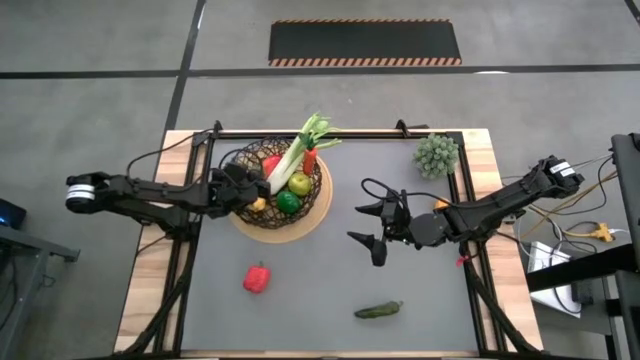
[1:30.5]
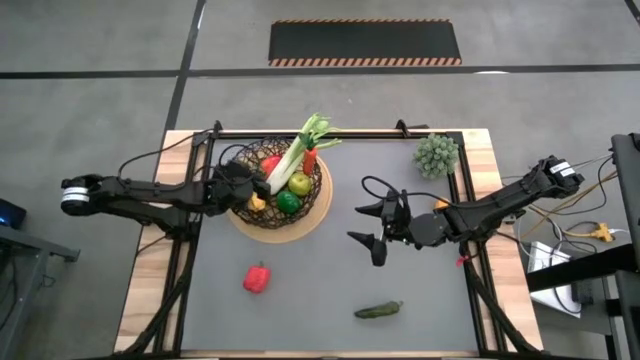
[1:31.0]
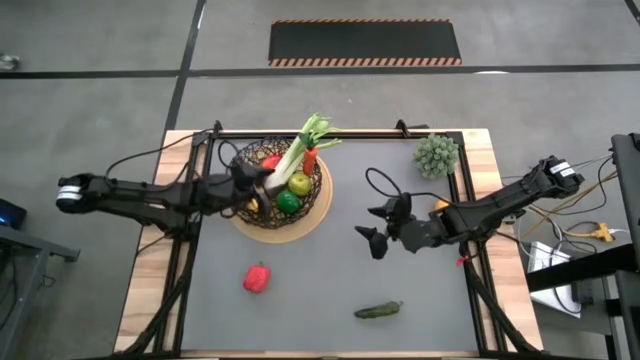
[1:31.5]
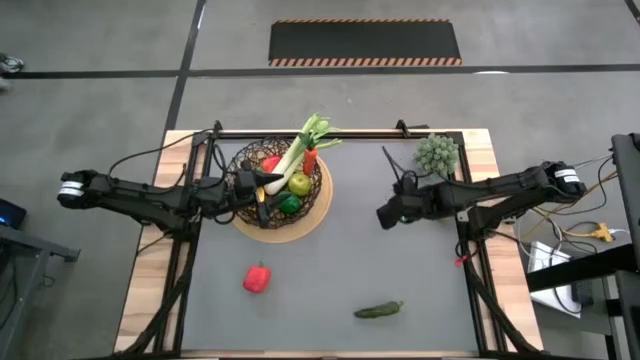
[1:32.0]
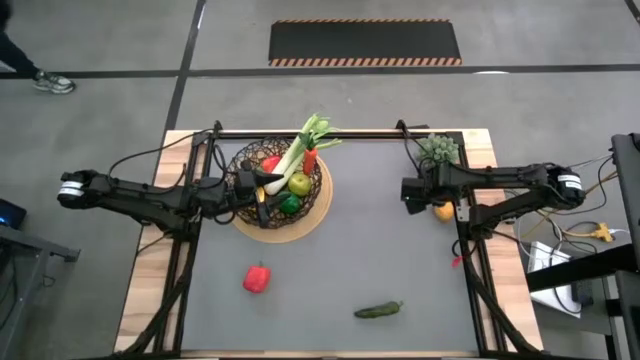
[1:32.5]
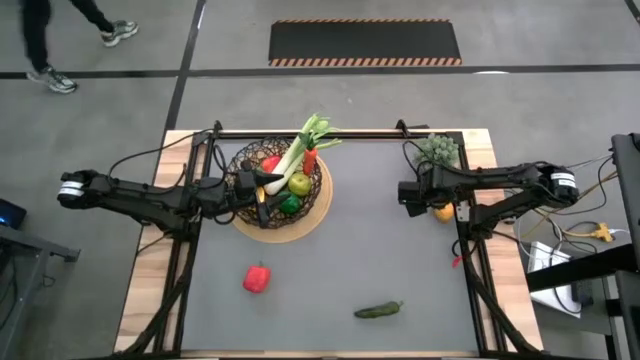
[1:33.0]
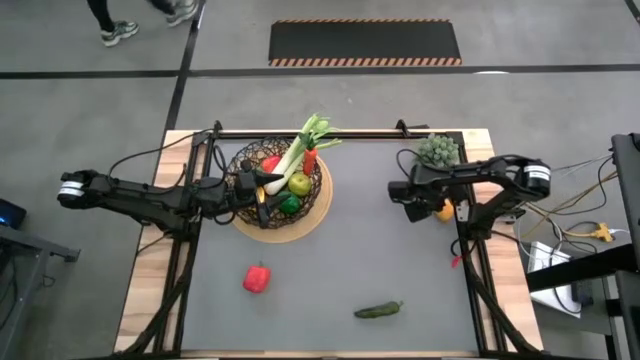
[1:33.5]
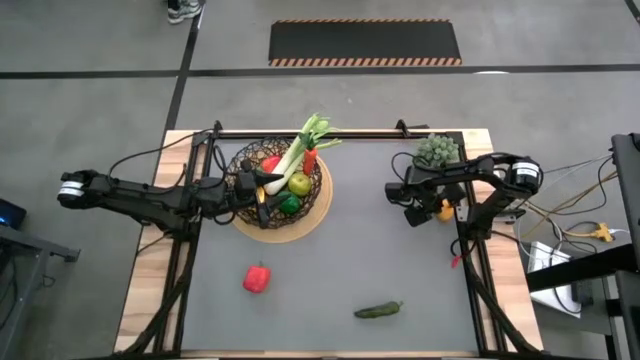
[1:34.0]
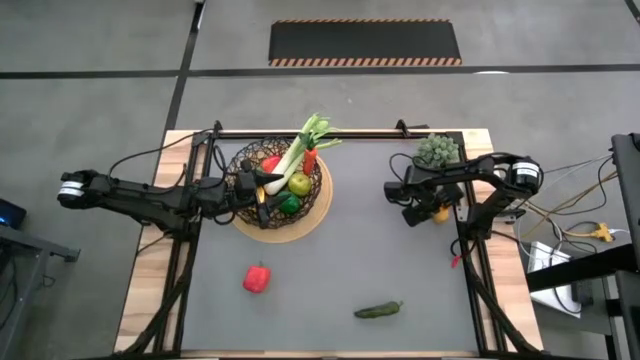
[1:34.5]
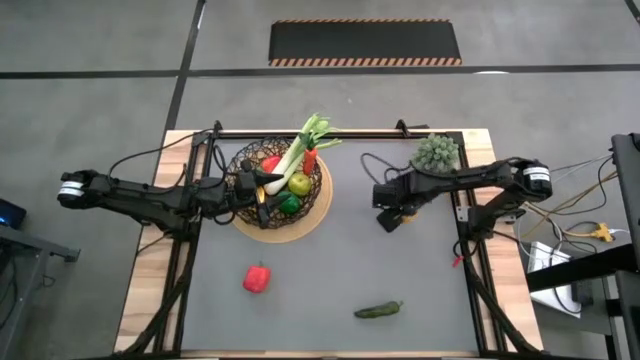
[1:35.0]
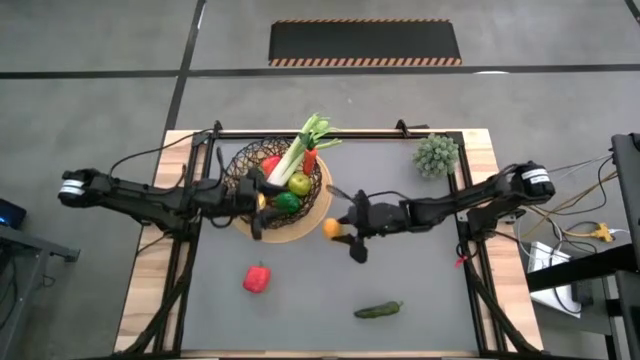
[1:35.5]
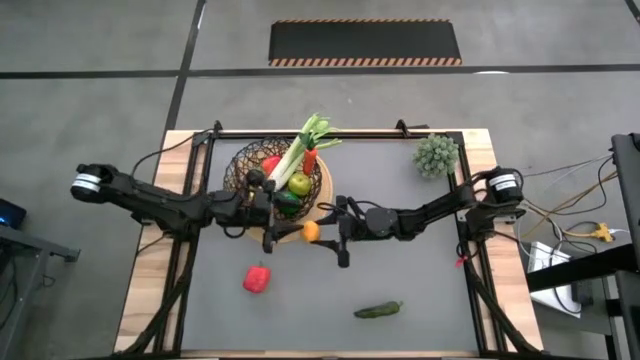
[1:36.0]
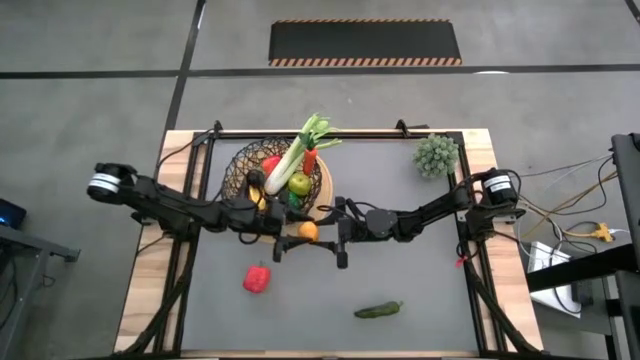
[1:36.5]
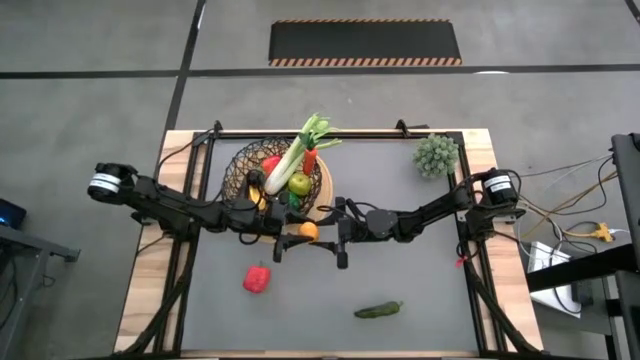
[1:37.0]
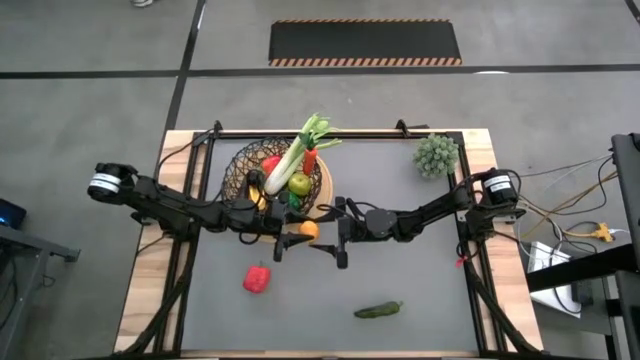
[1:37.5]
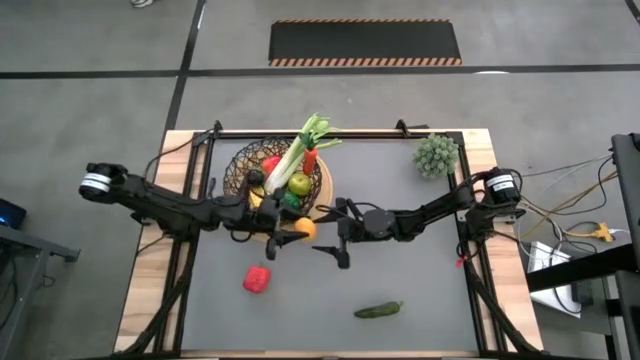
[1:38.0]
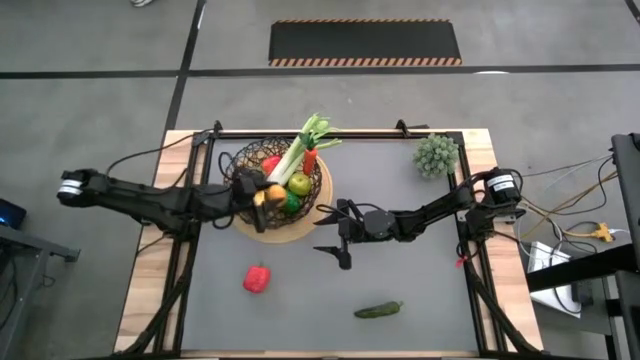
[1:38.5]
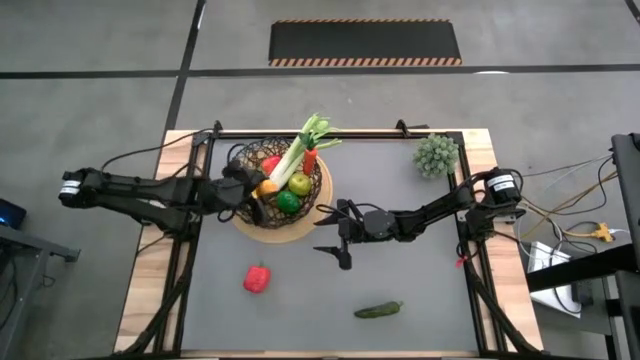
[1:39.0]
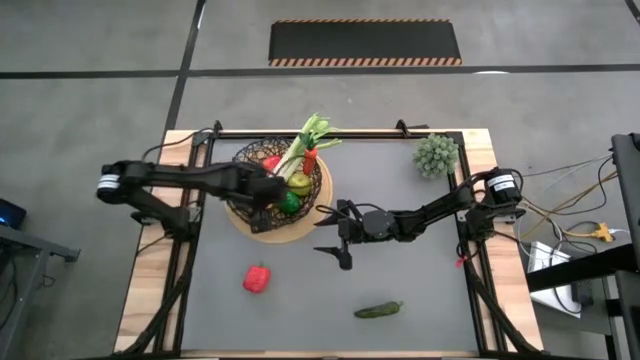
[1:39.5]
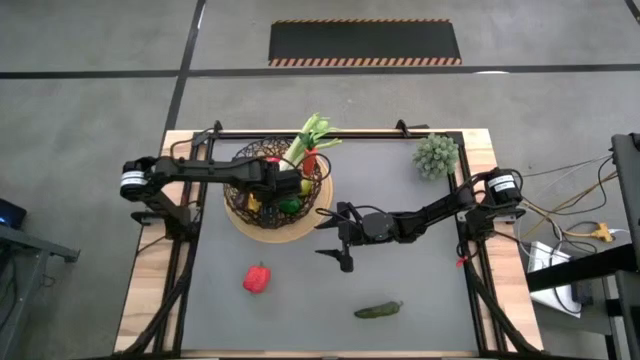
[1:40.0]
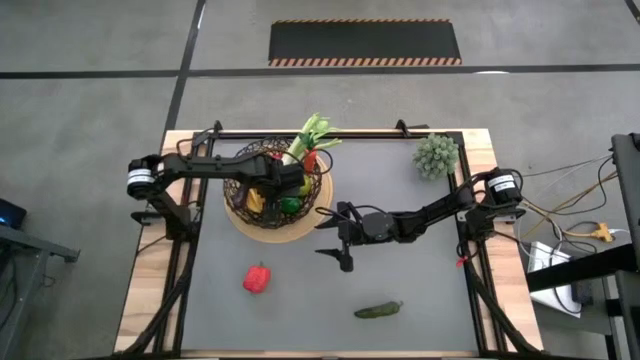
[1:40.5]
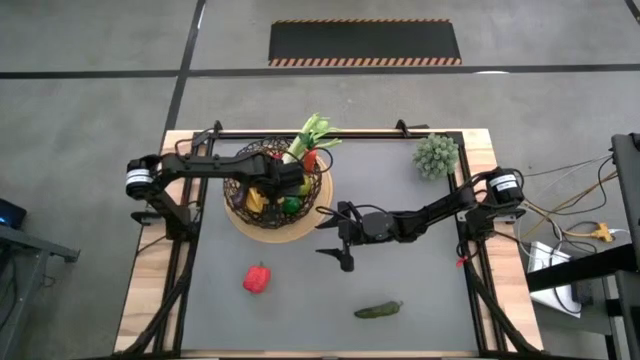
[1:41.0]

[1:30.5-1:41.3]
Task: Build produce basket
Put the yellow lemon into the black wire basket

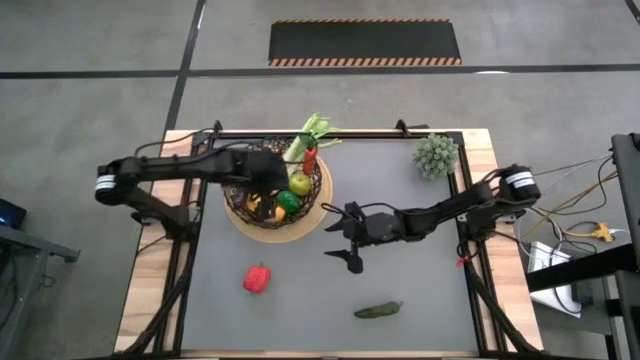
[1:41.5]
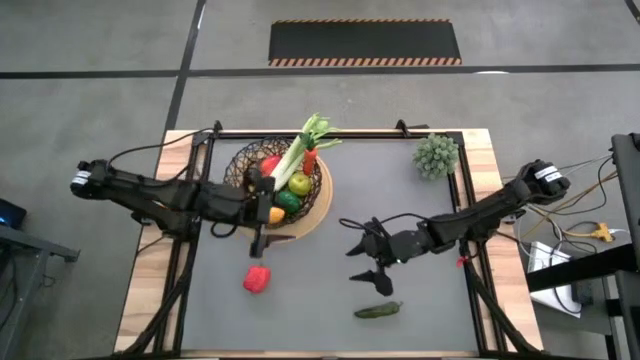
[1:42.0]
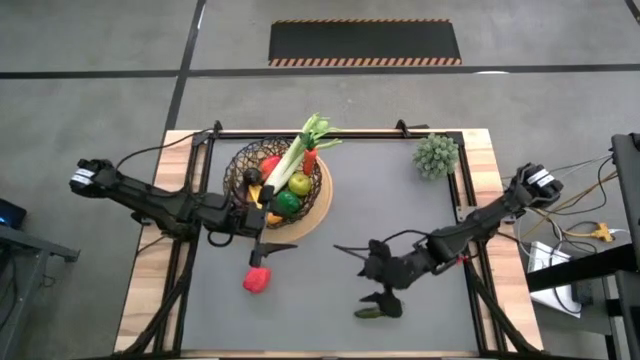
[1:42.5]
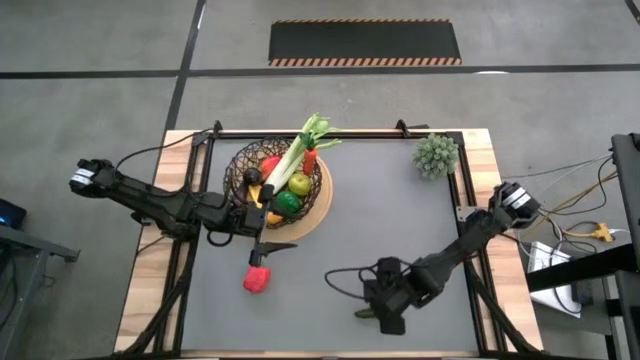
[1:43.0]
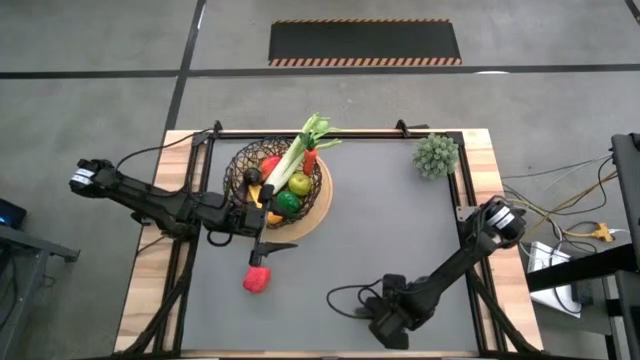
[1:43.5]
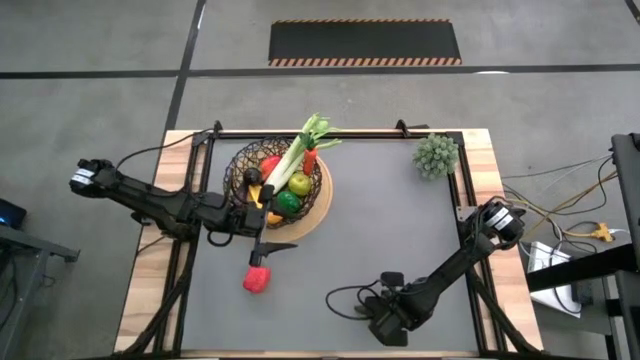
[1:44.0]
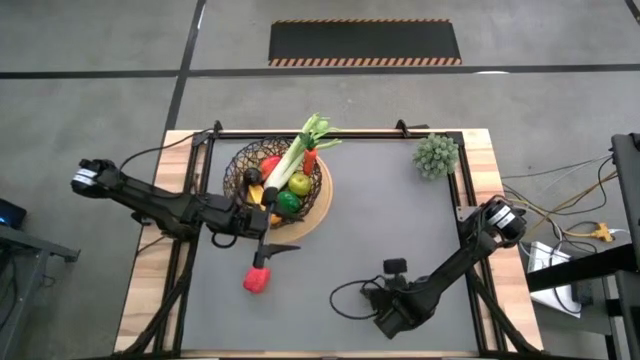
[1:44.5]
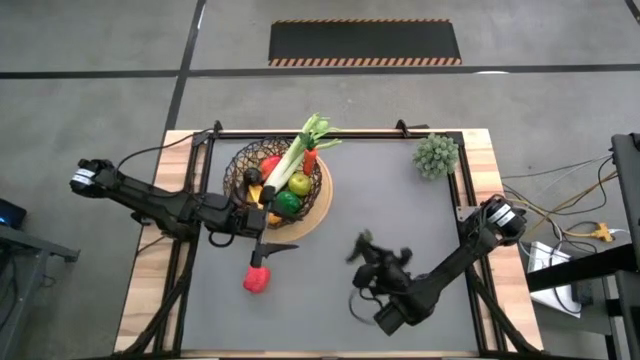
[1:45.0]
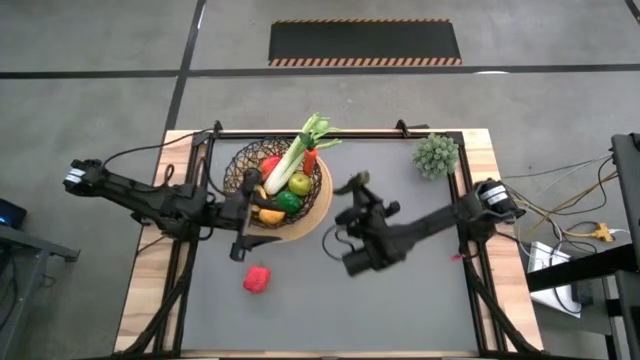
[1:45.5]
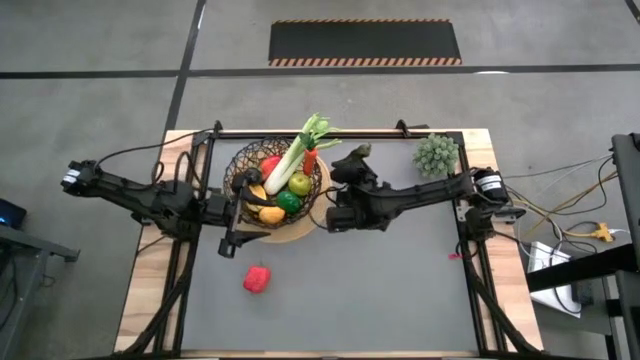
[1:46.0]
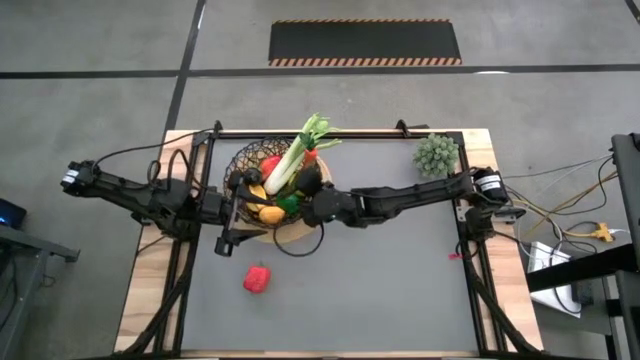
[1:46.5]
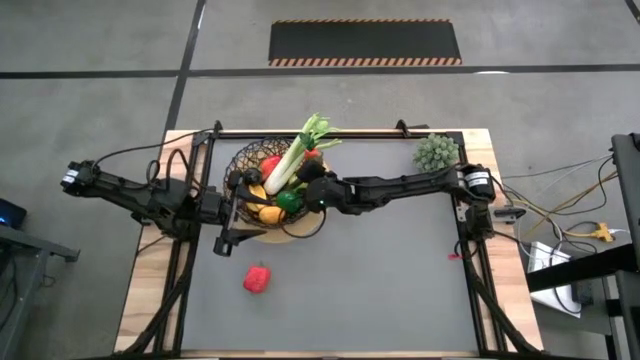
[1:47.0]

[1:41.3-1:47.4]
Put the green chili pepper into the black wire basket

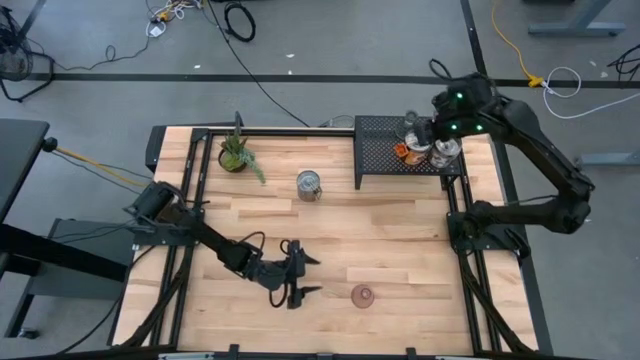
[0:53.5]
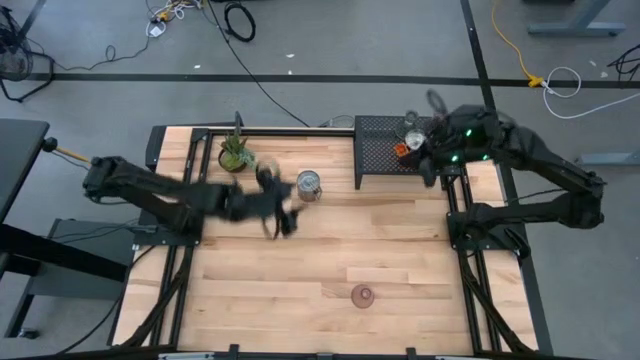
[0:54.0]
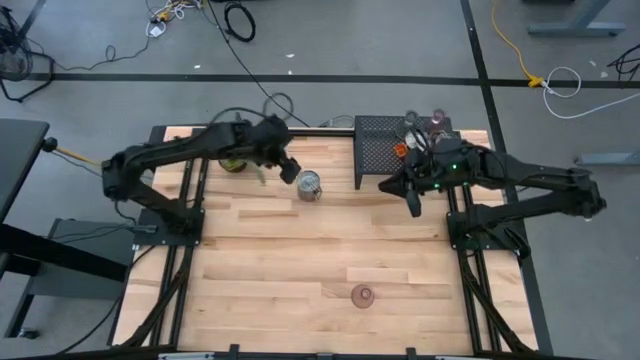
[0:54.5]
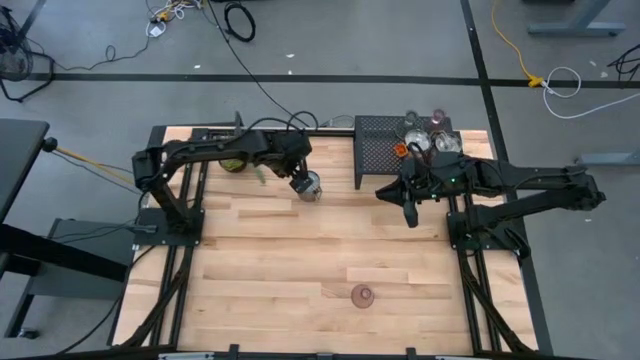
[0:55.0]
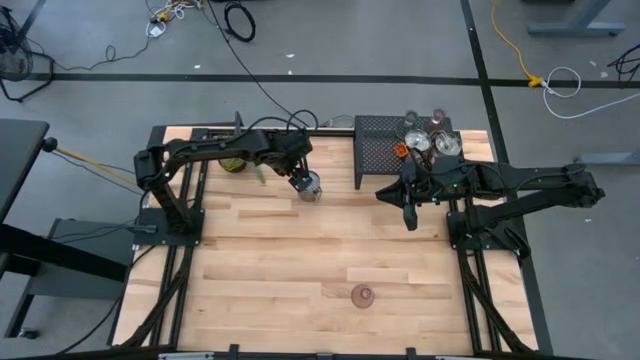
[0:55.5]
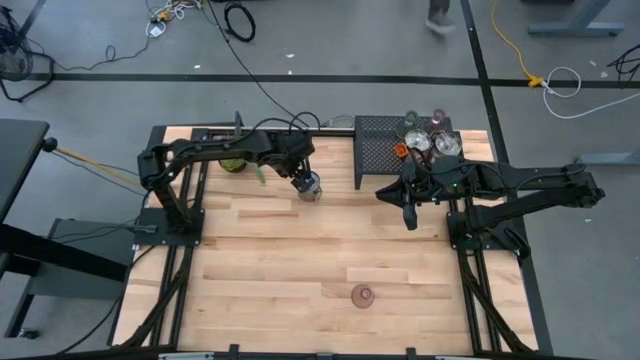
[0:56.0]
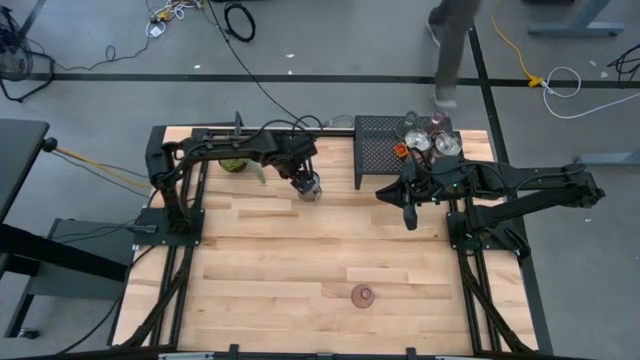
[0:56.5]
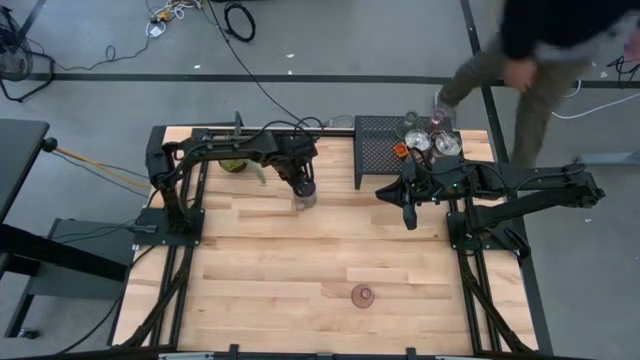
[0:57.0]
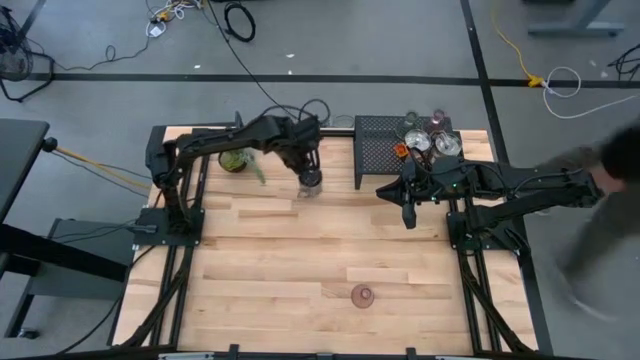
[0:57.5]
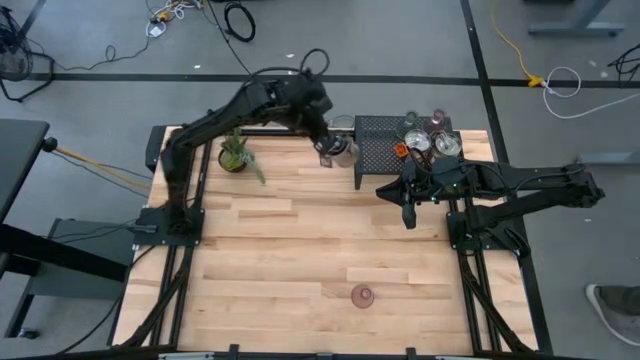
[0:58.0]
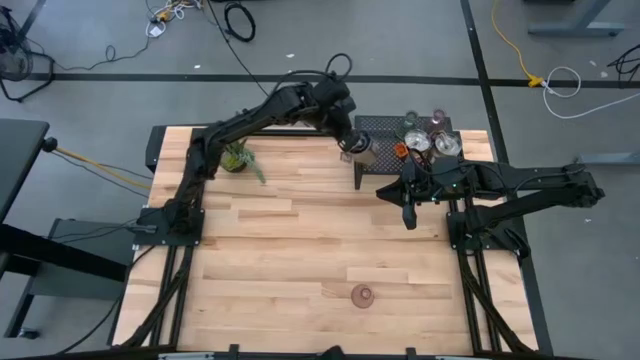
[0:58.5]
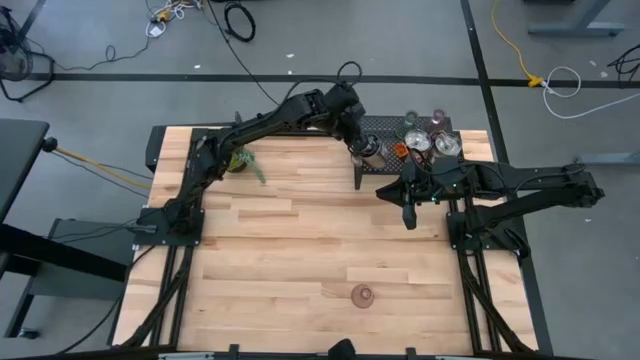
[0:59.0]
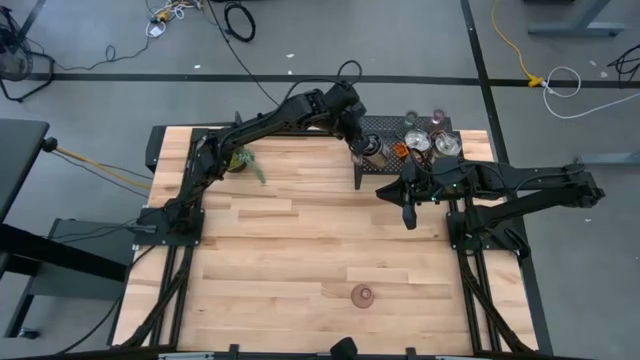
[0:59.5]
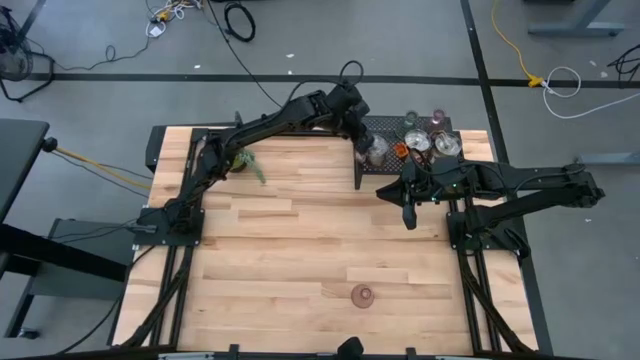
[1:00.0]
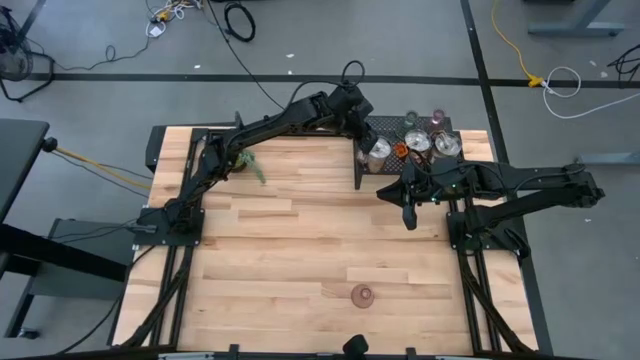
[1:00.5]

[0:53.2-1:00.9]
Task: Pick & Place candle stick holders
Put the brown scented candle on the shelf
